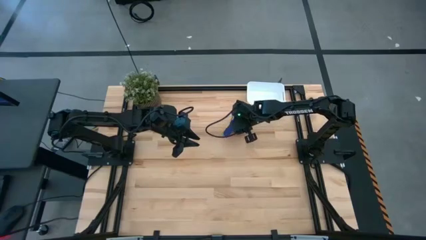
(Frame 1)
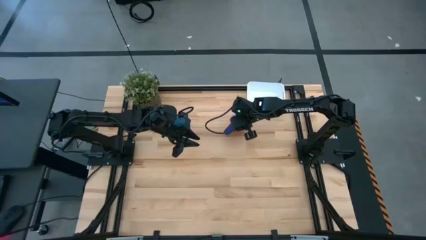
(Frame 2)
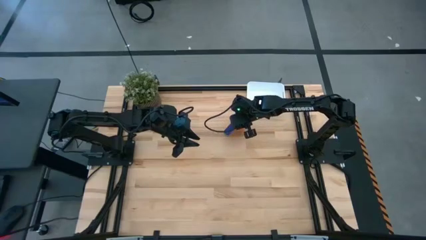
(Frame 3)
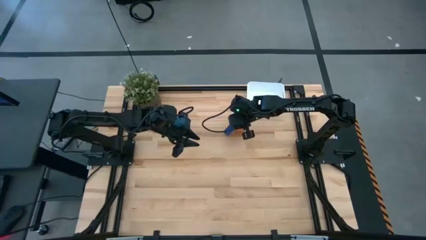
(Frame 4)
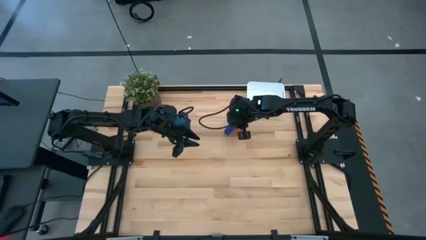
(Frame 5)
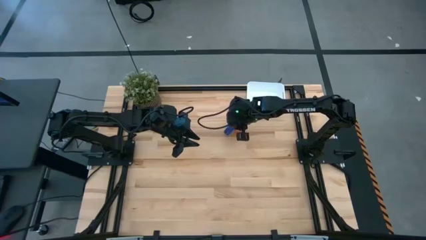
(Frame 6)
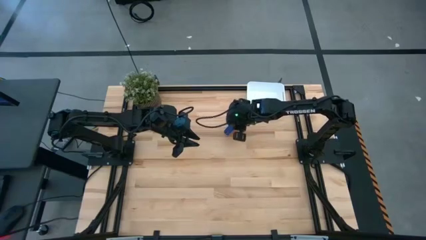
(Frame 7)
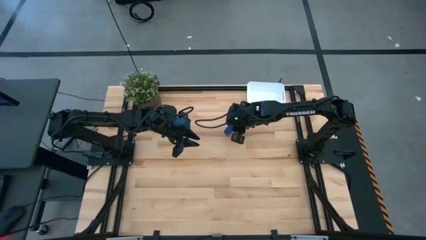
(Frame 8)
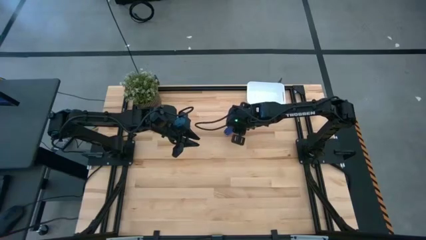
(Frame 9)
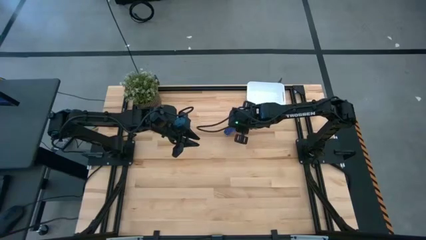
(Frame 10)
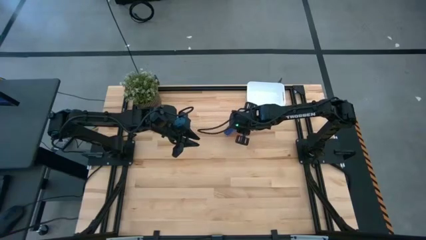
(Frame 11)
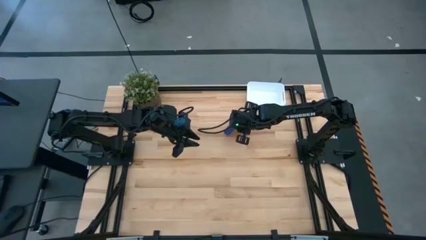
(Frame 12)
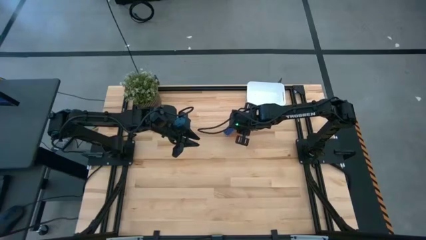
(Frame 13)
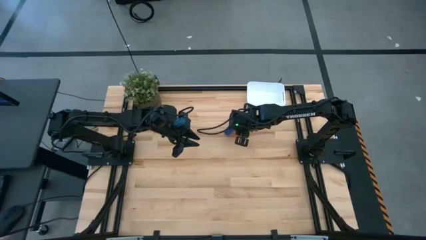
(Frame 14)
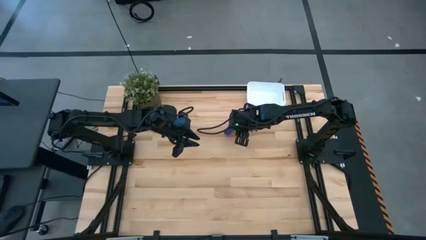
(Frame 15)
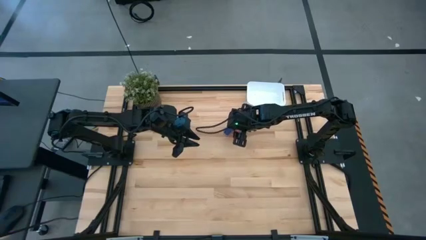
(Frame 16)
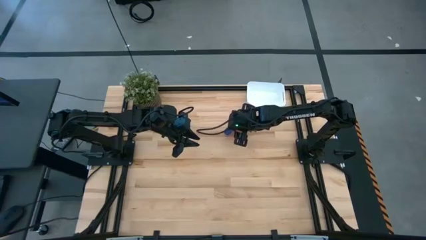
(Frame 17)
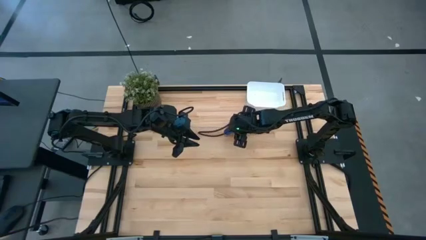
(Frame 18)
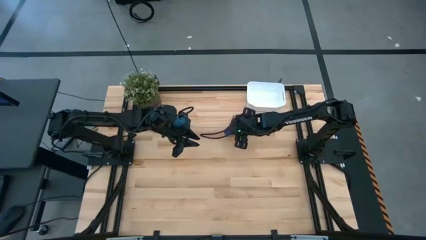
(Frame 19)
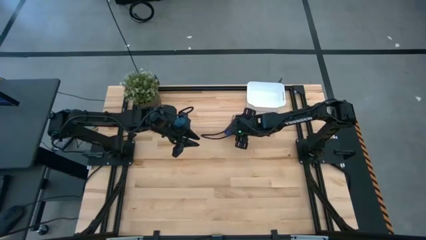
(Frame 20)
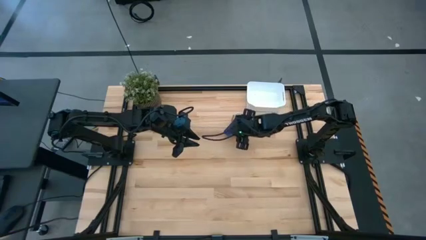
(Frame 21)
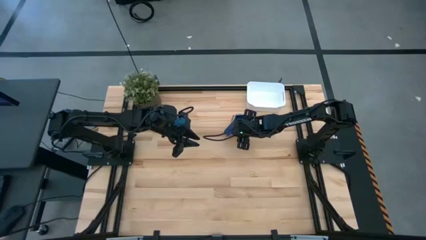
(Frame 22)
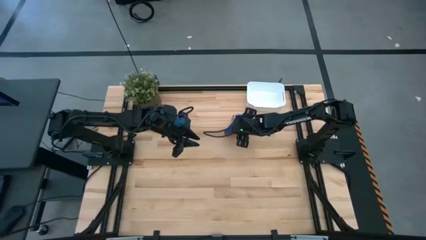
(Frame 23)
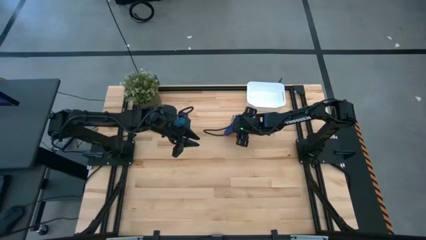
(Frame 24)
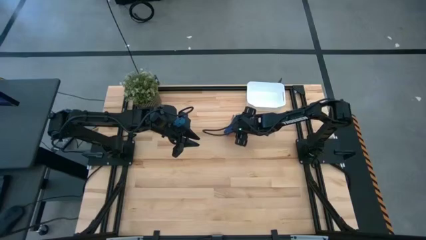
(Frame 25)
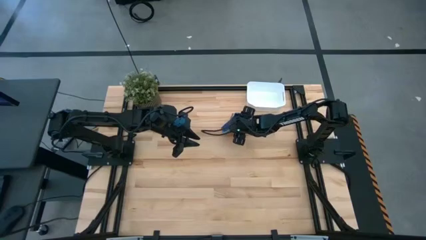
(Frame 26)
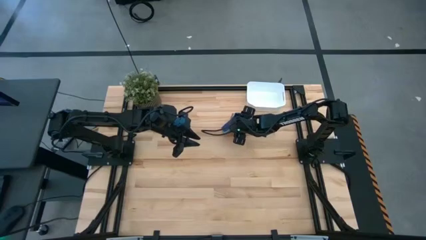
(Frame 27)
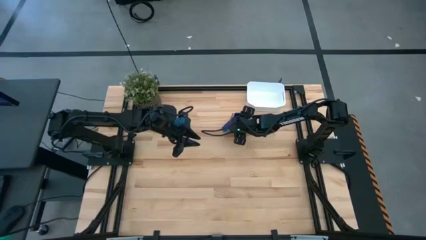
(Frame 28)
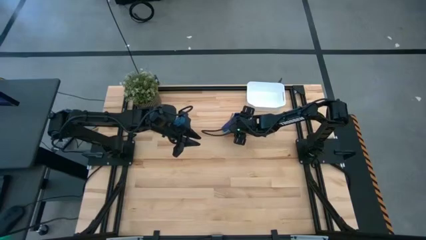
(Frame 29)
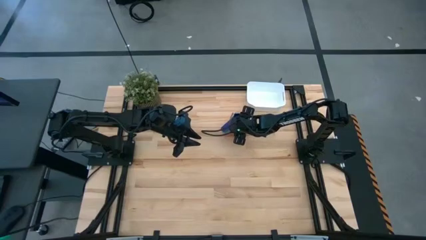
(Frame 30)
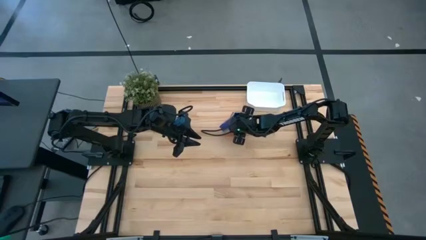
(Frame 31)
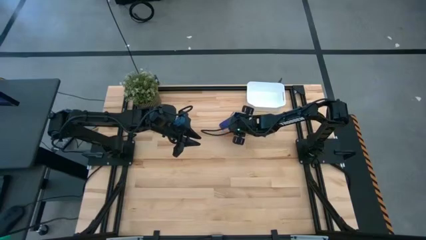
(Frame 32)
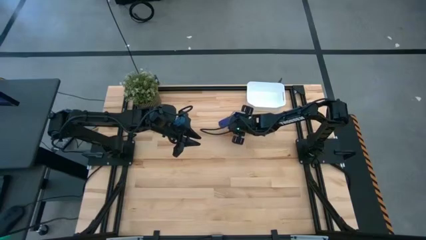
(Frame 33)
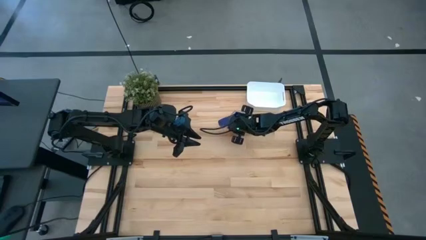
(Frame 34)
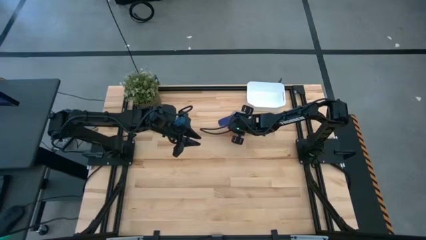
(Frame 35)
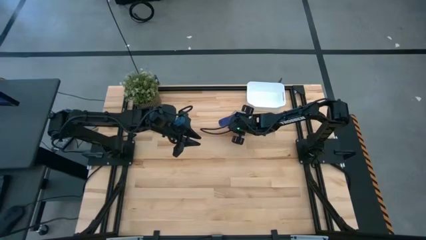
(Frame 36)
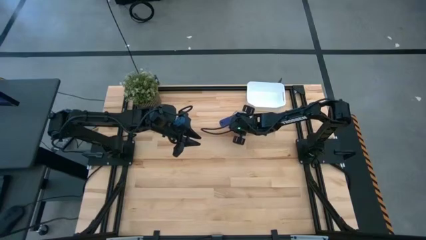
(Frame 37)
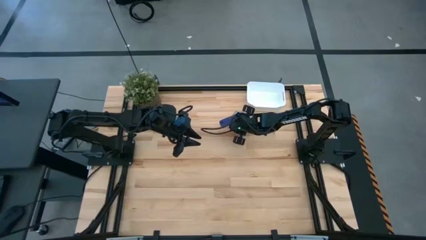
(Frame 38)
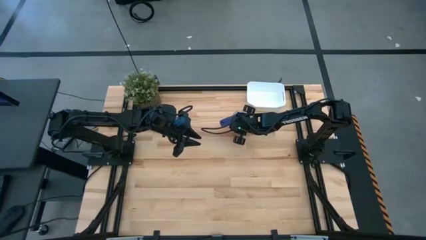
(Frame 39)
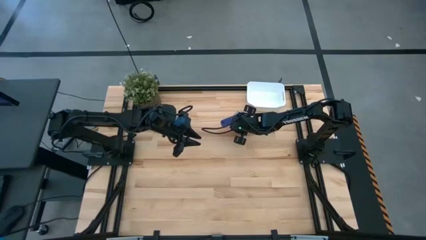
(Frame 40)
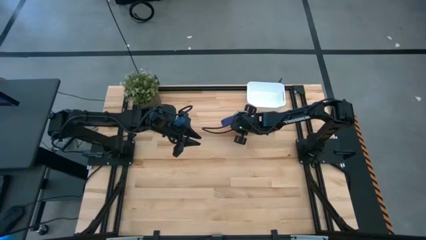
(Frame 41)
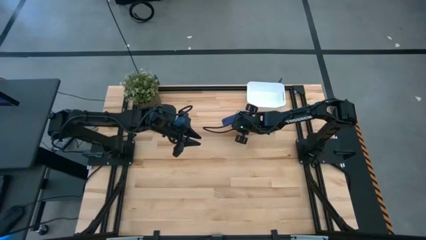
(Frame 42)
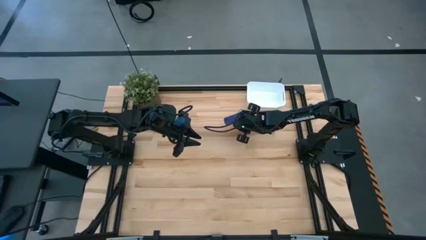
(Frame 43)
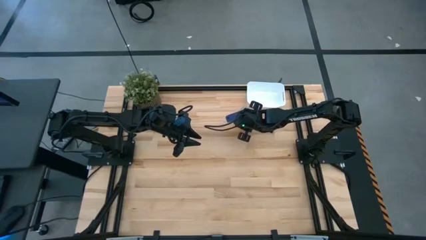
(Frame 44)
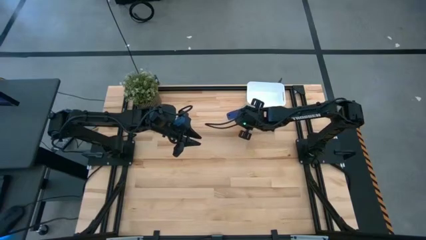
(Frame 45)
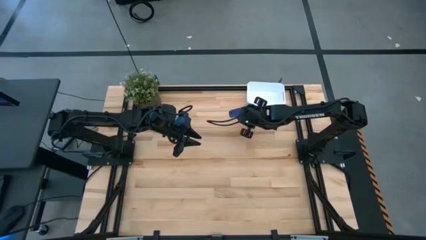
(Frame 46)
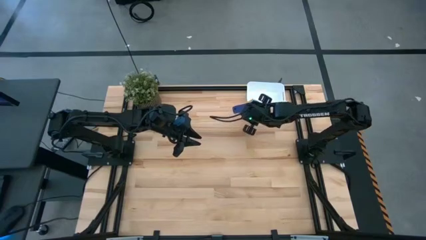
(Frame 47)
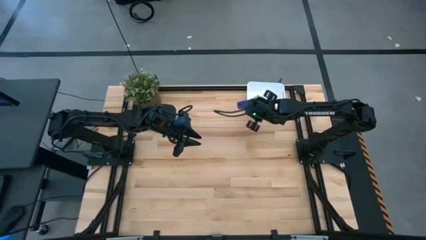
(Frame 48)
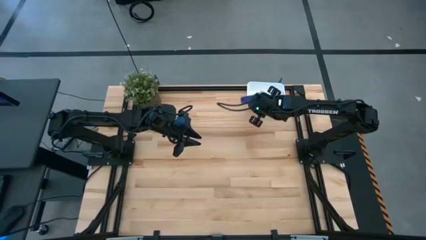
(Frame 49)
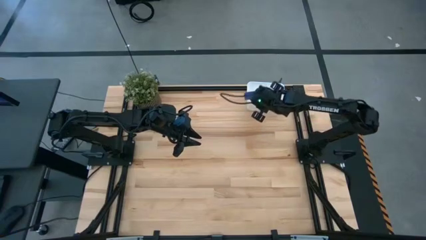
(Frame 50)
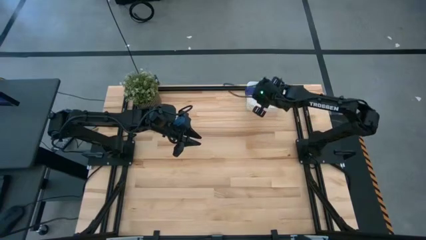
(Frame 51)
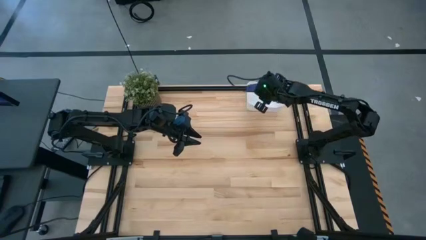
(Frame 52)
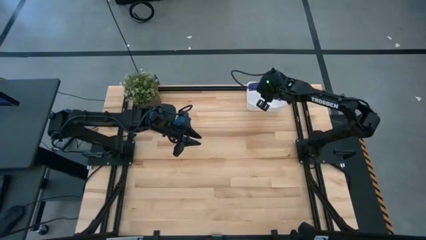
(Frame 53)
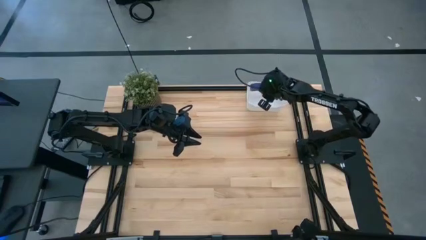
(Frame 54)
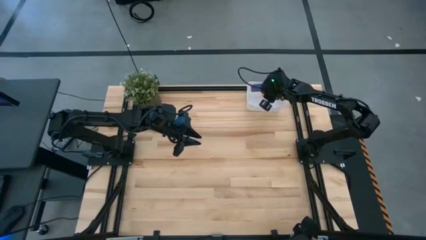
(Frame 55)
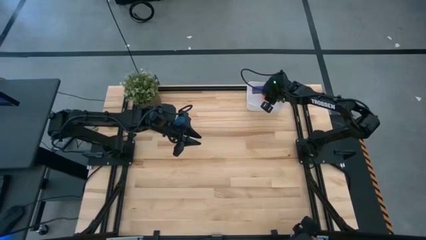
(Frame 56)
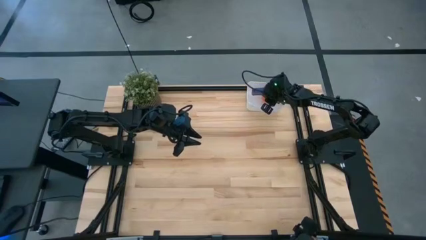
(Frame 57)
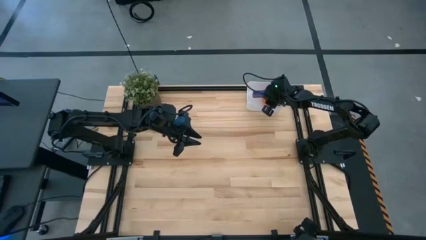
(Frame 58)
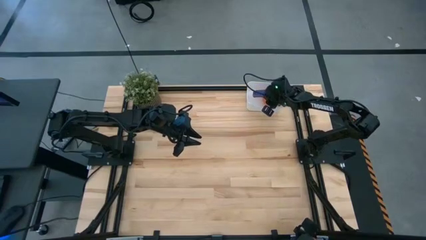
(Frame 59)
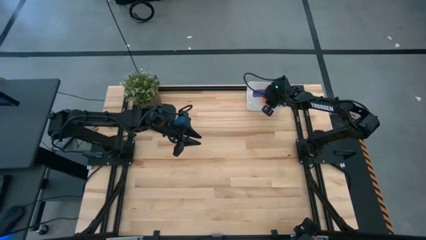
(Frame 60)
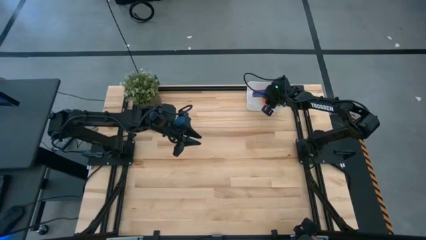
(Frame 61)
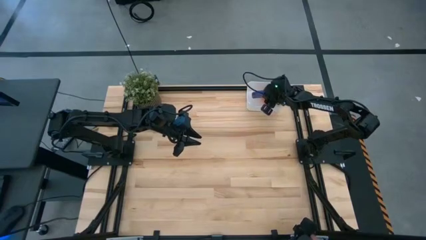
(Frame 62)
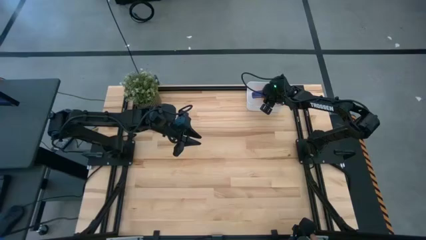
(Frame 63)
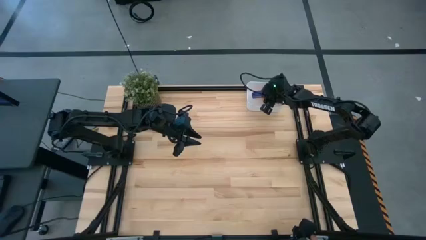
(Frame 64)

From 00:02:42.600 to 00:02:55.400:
Task: Nest measuring cups in basket
Put the nested measuring cups into the white bin

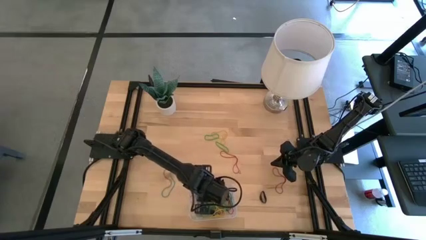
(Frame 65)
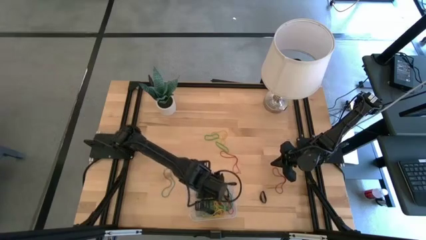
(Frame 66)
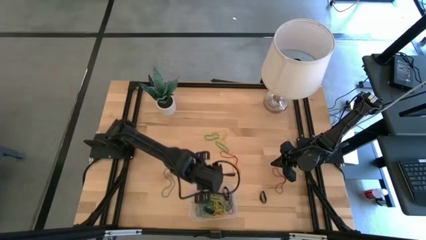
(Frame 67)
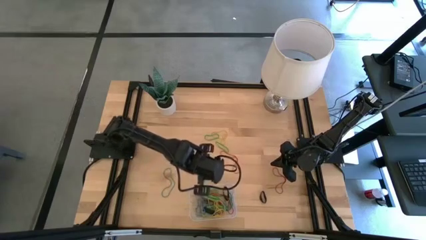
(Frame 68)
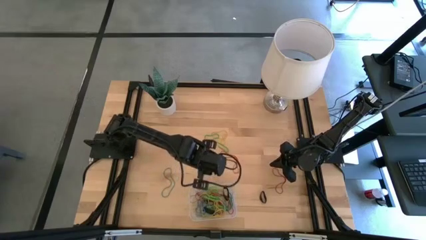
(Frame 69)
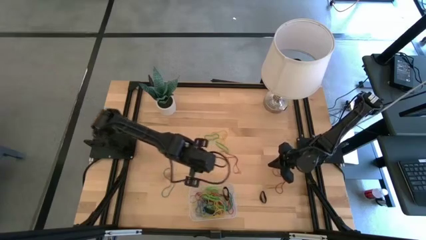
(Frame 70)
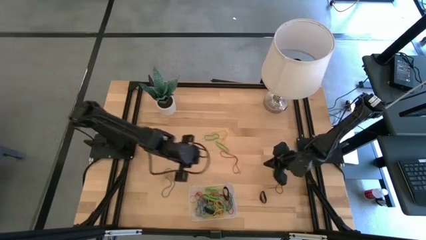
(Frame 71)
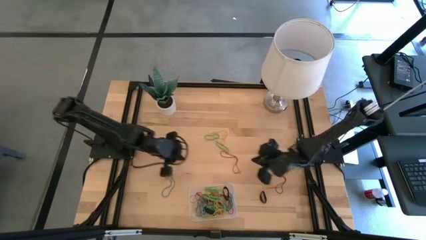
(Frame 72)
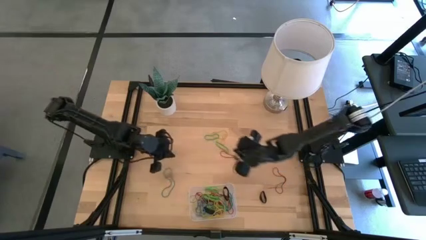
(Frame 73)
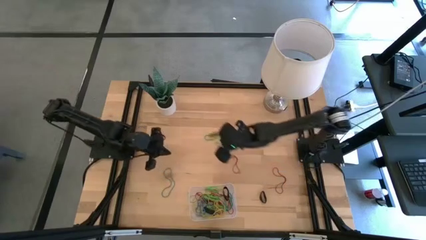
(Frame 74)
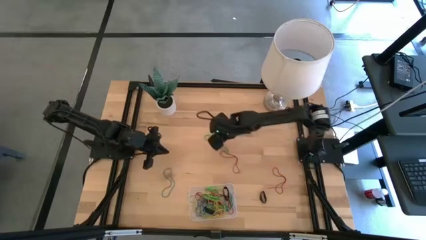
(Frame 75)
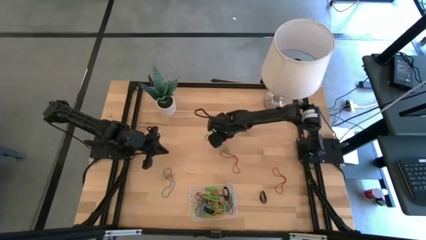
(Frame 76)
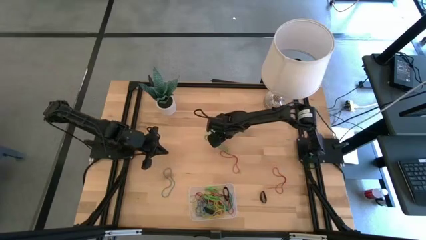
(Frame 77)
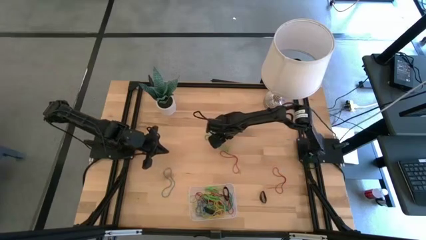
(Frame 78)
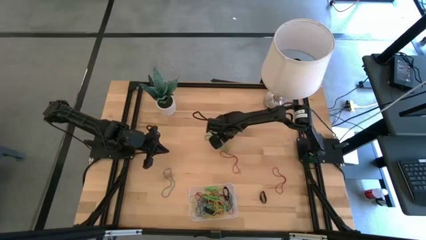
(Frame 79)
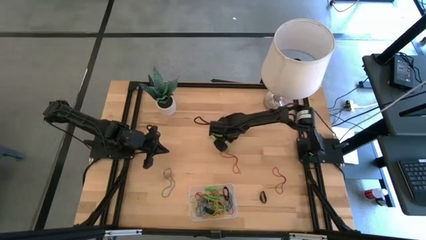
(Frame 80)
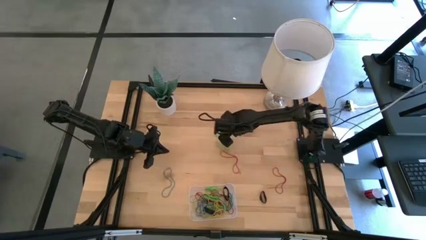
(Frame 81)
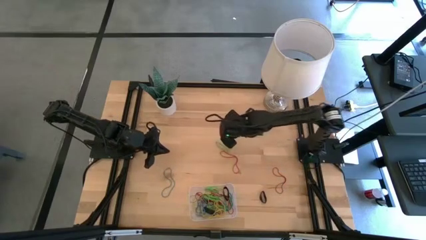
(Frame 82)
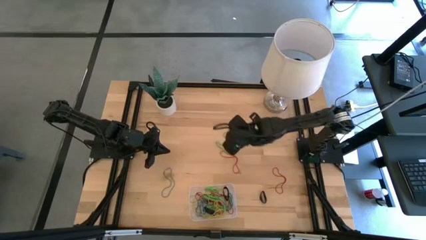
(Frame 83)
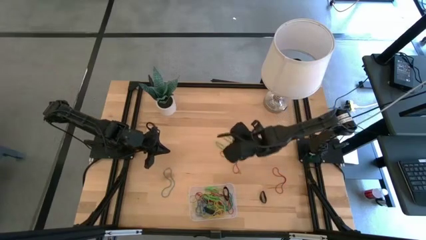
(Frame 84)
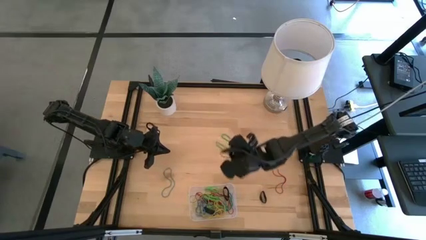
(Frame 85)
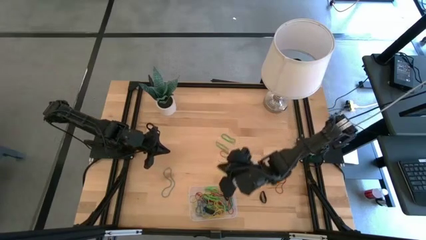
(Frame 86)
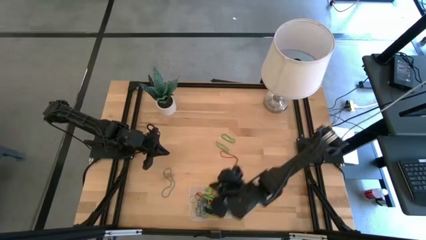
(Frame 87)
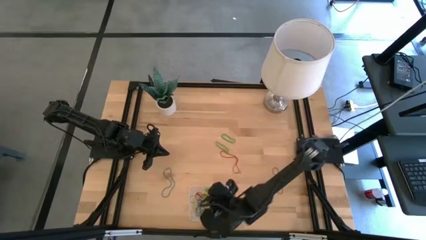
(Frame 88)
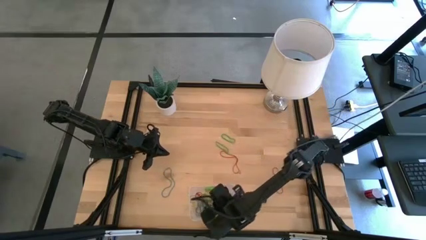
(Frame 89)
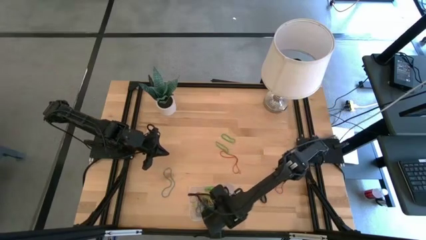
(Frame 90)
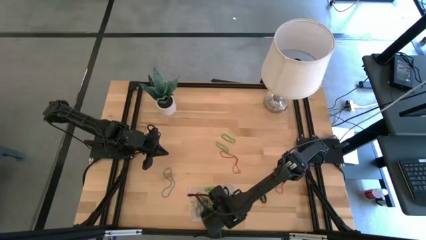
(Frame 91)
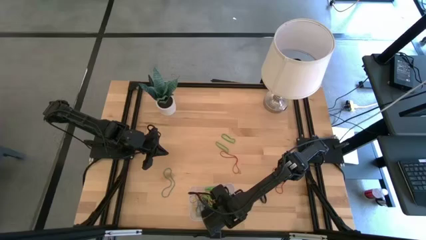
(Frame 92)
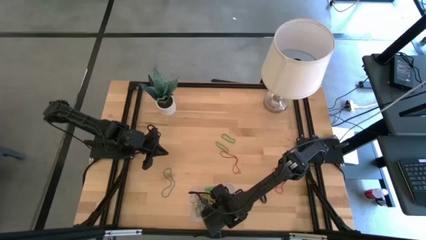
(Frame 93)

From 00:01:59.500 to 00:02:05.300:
Task: Pick and place rubber bands into bin
Put the yellow rubber band into the transparent bin
